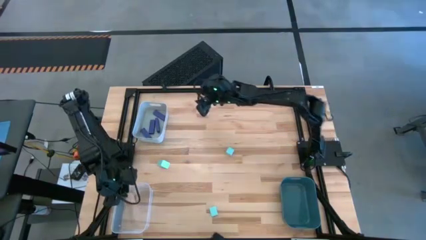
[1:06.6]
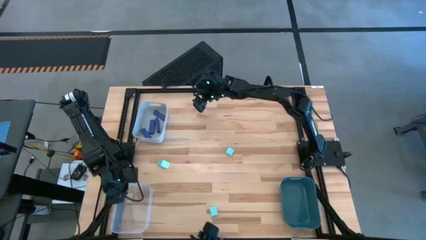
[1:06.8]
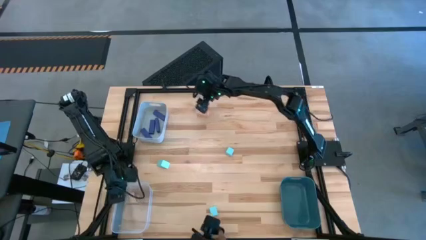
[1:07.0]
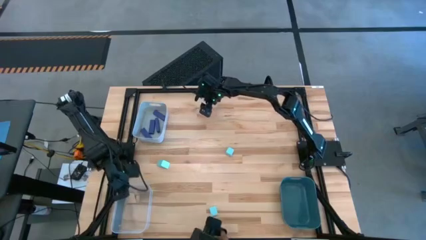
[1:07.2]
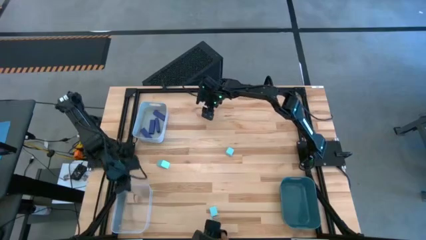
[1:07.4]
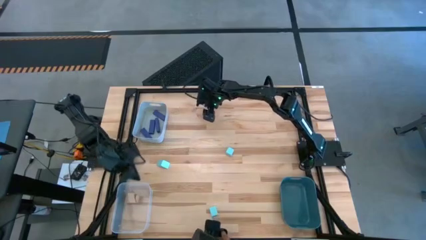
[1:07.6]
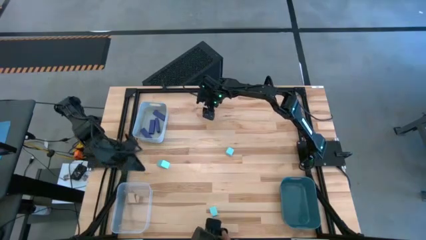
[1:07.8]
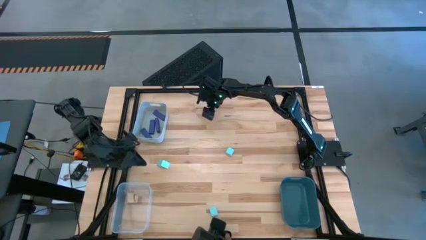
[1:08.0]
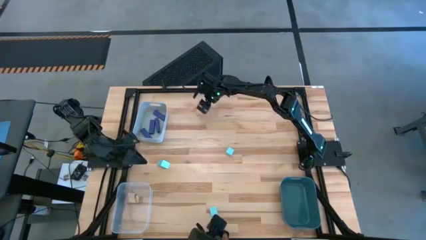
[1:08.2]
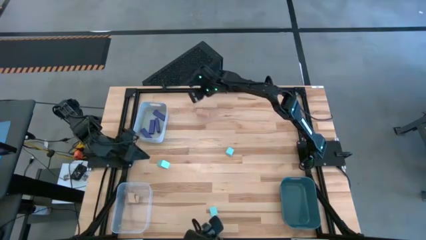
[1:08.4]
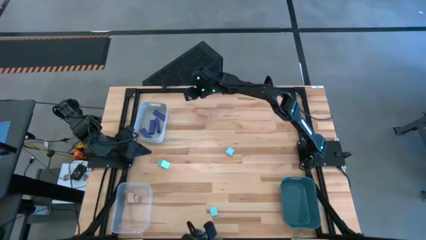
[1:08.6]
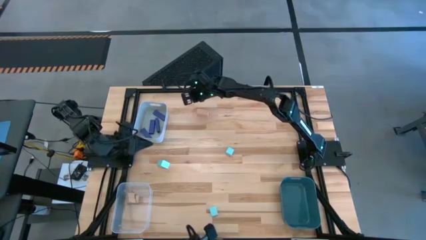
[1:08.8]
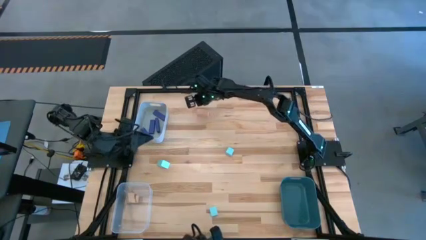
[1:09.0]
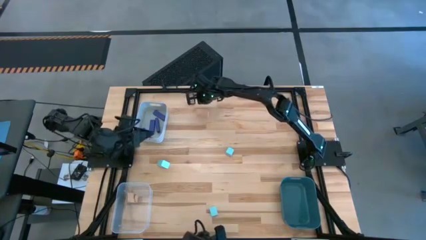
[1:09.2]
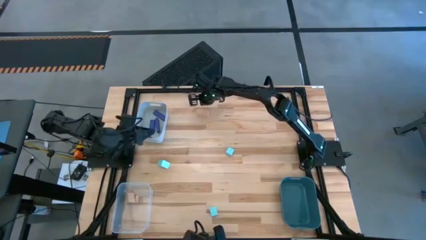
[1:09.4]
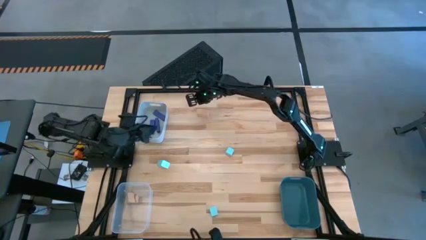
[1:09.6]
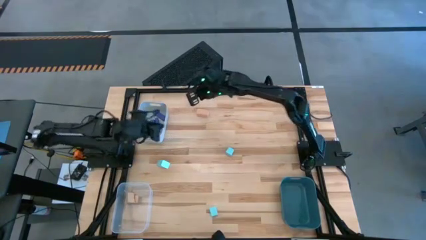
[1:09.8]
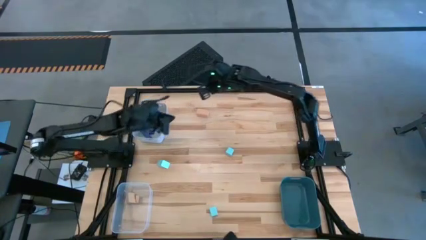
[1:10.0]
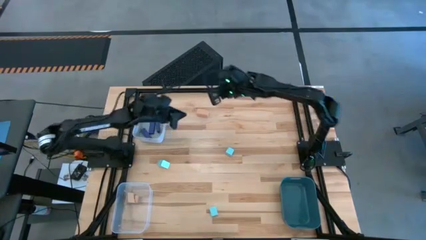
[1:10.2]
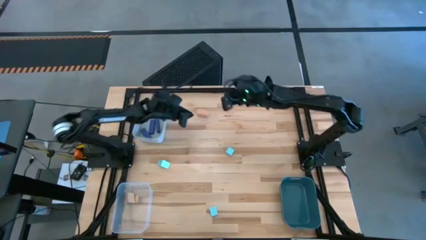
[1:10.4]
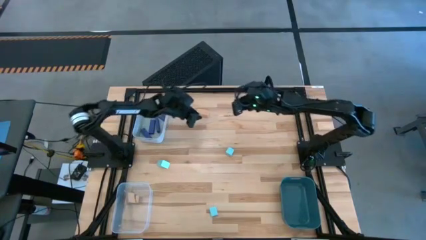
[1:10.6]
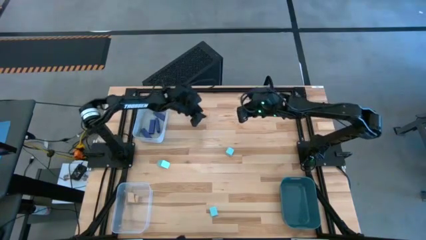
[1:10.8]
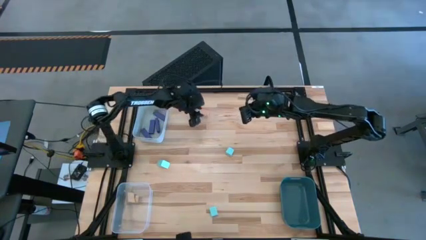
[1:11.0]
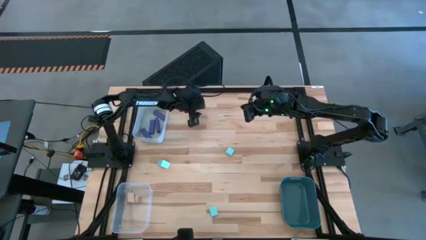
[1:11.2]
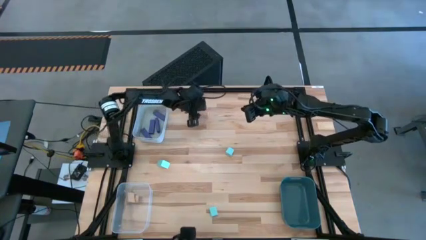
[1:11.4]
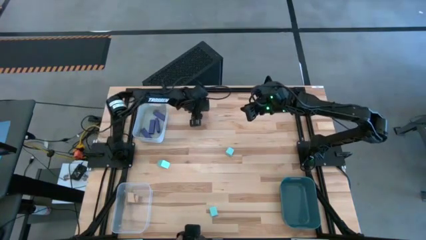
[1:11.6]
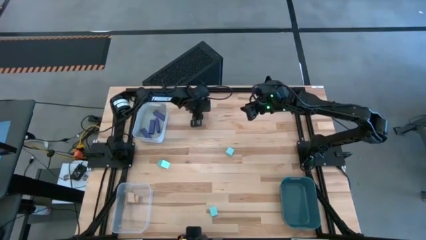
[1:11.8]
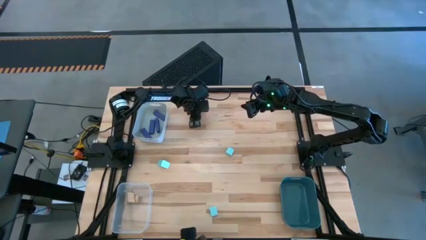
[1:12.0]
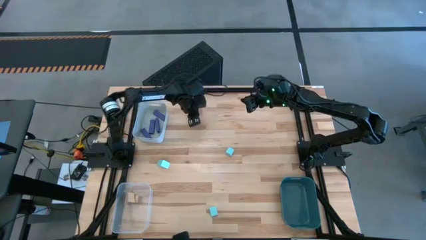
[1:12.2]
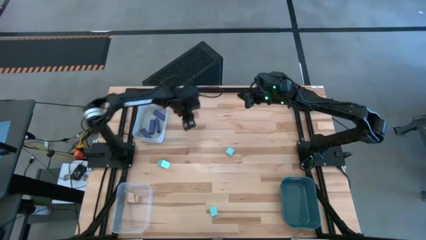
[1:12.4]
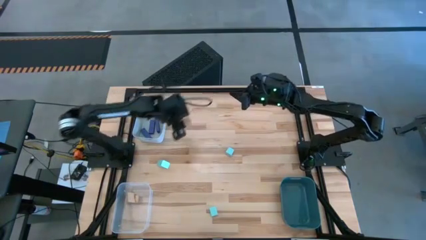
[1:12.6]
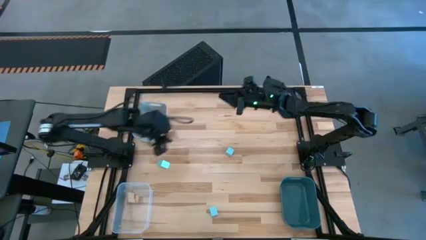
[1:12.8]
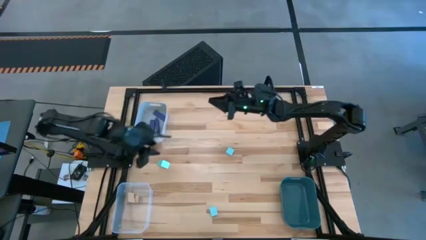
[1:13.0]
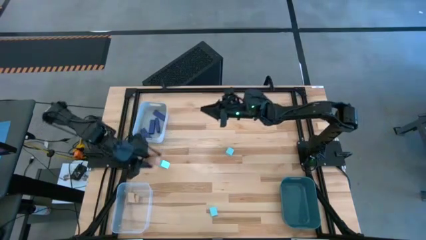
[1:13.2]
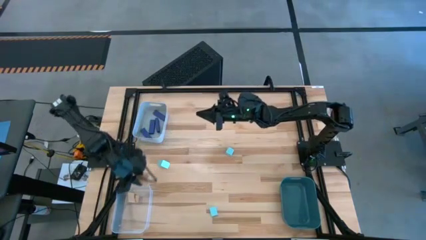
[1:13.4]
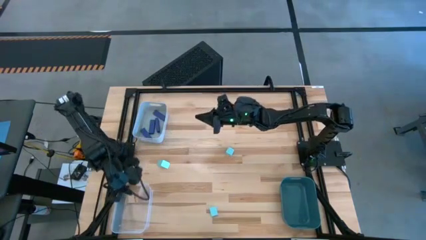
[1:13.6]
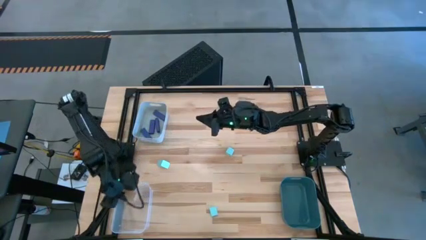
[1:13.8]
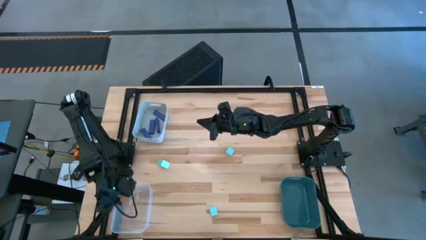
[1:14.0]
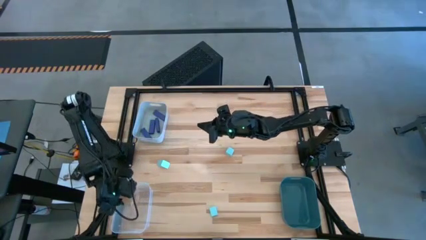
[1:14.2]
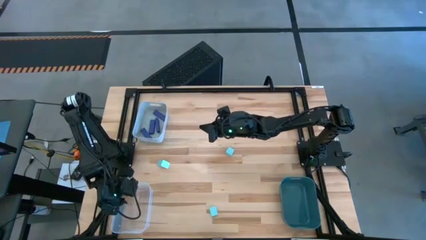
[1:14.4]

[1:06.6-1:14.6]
Task: Sort & place blocks by color
Put the brown block into the transparent bin

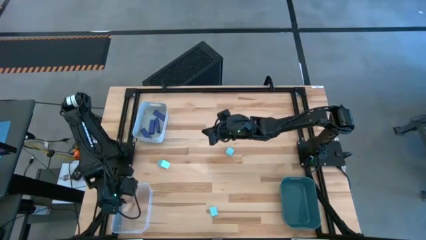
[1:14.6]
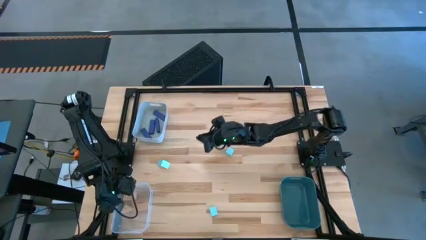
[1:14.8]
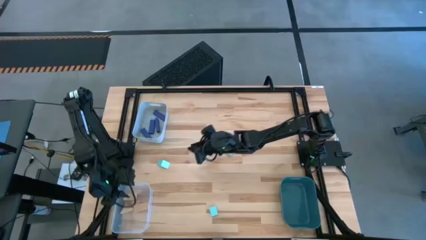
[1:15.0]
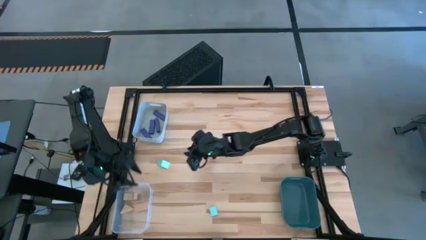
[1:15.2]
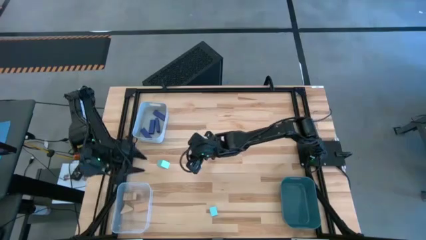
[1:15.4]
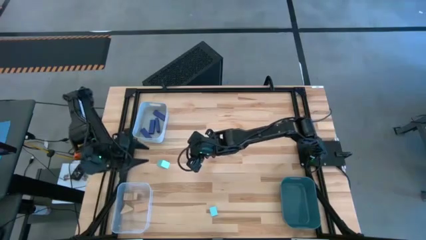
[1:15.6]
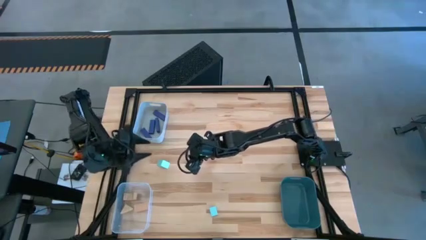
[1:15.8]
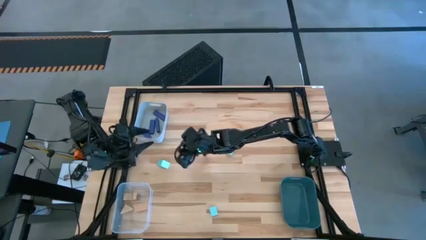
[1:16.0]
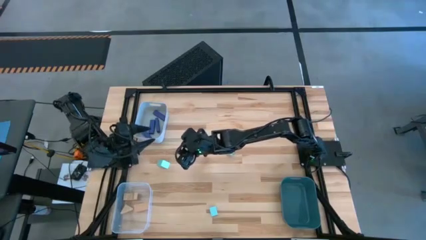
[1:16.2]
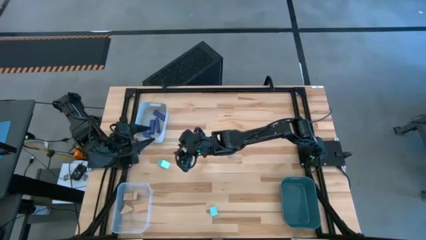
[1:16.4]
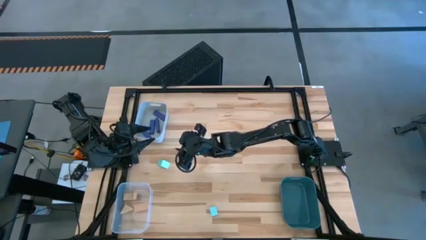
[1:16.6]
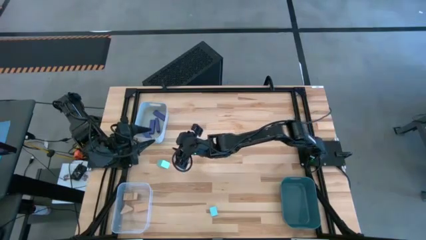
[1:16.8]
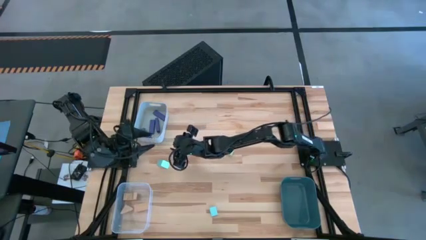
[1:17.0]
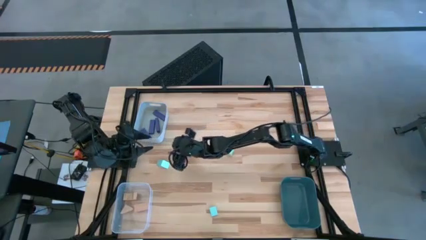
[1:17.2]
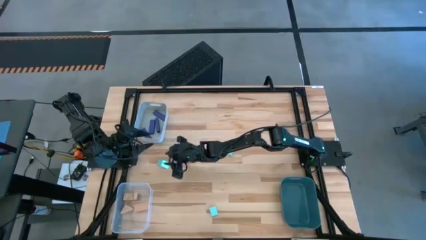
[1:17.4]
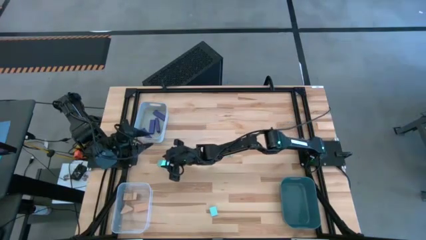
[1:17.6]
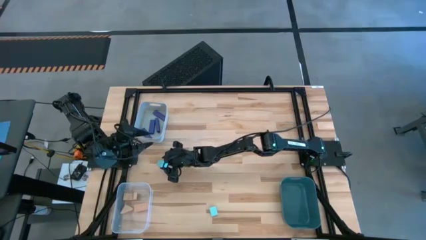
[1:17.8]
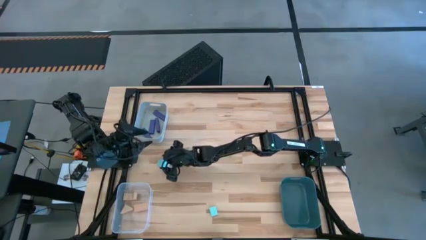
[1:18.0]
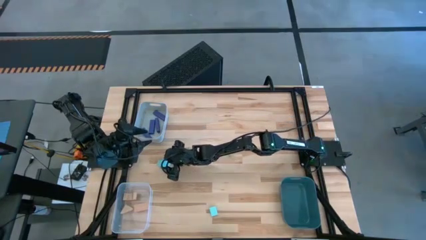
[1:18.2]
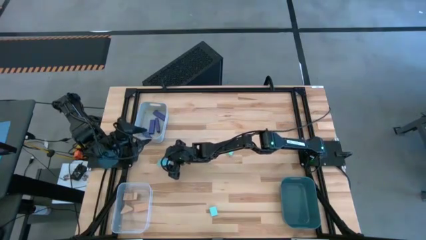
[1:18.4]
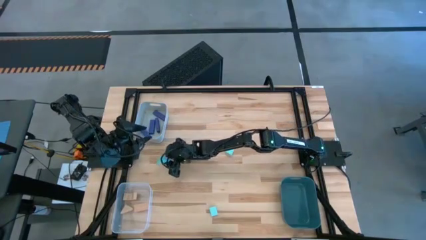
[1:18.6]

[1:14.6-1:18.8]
Put the blue block into the blue bin

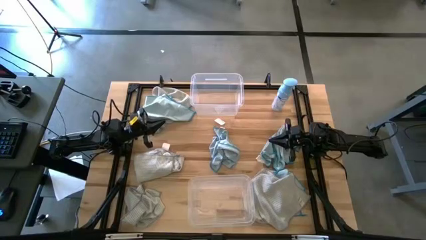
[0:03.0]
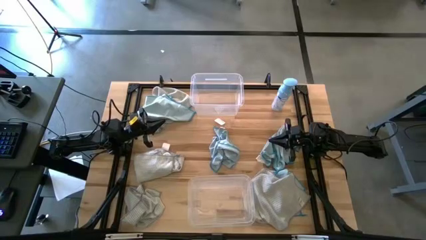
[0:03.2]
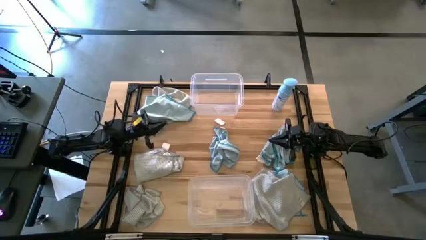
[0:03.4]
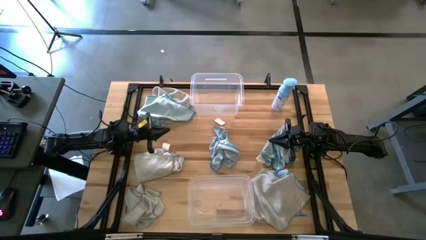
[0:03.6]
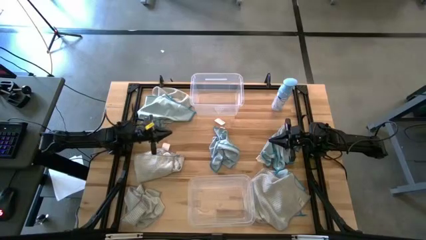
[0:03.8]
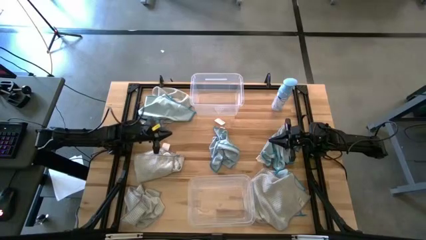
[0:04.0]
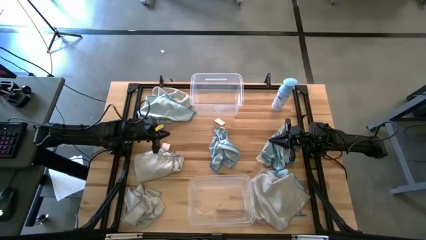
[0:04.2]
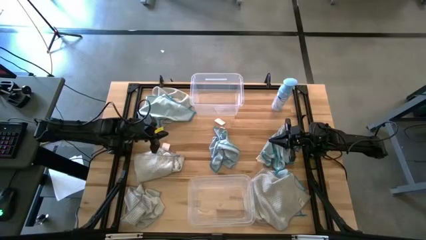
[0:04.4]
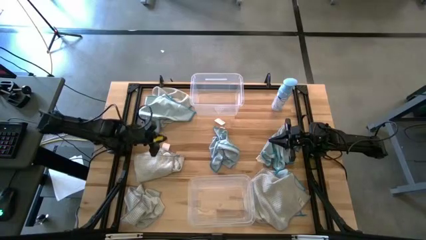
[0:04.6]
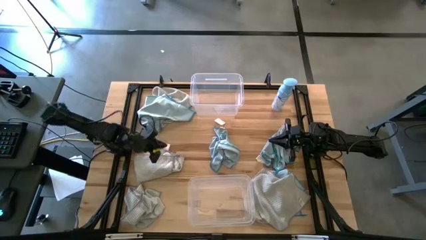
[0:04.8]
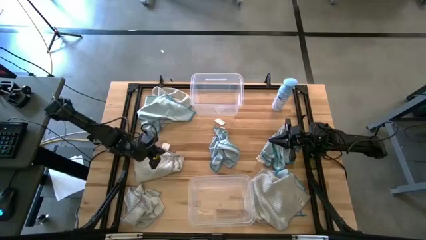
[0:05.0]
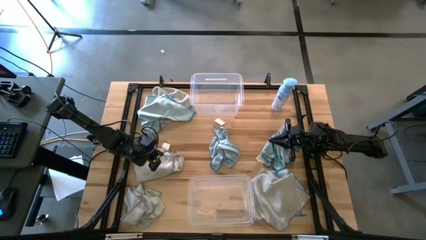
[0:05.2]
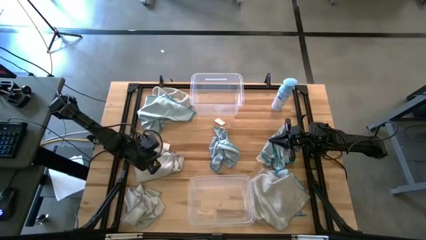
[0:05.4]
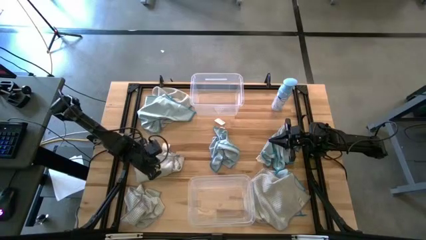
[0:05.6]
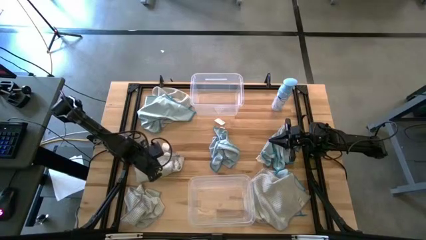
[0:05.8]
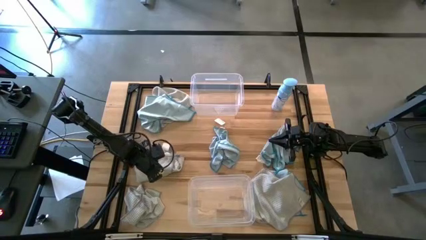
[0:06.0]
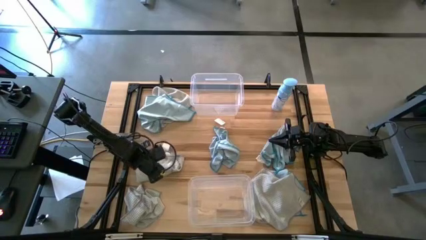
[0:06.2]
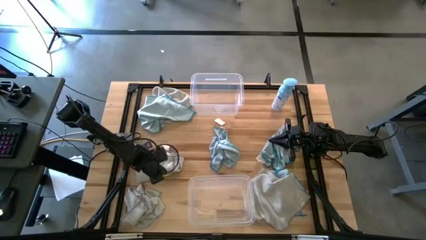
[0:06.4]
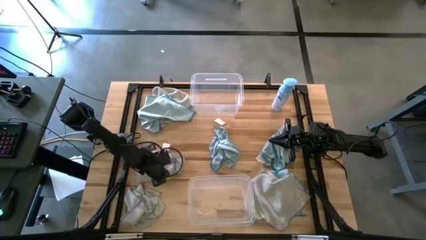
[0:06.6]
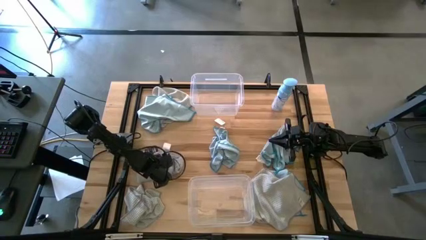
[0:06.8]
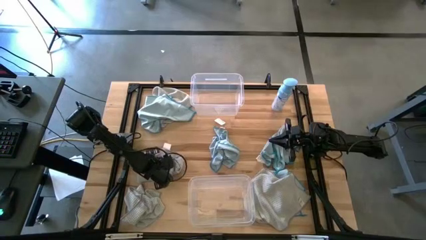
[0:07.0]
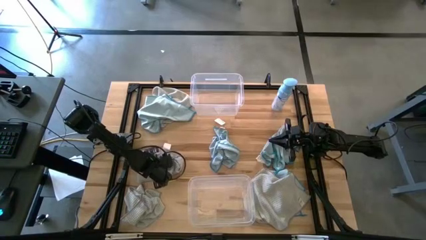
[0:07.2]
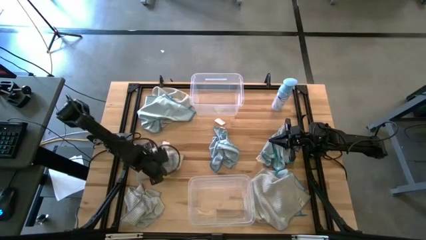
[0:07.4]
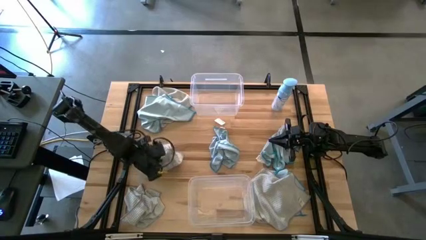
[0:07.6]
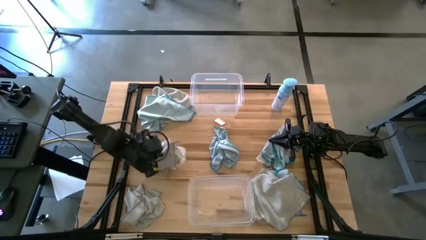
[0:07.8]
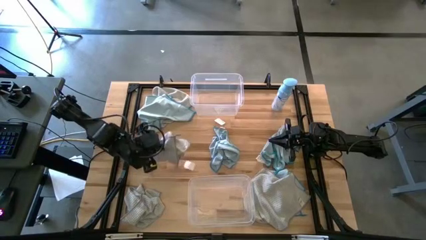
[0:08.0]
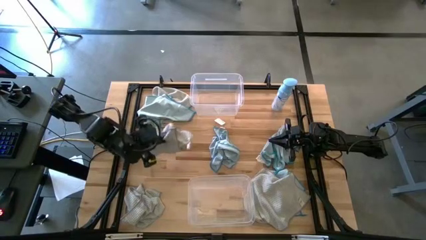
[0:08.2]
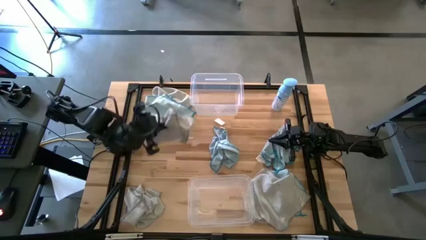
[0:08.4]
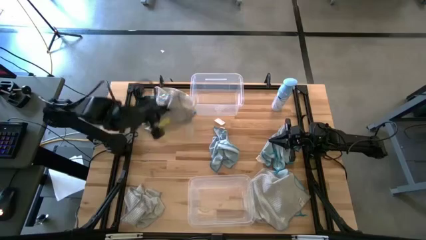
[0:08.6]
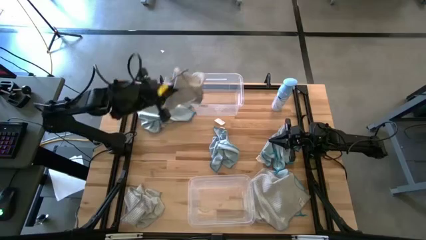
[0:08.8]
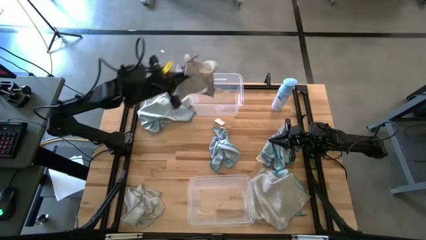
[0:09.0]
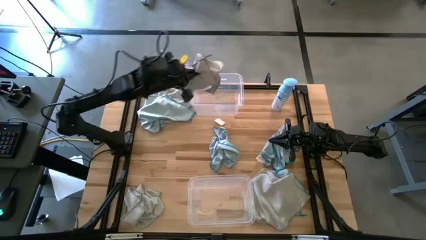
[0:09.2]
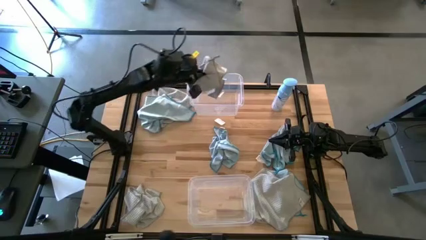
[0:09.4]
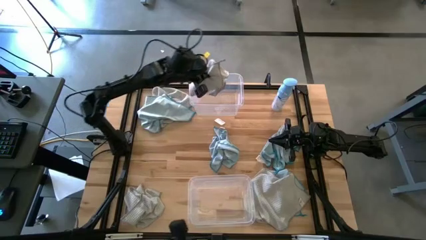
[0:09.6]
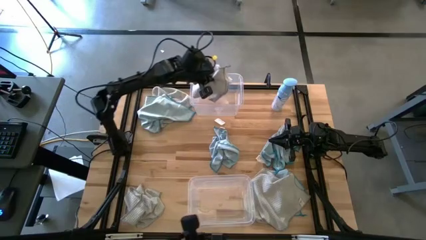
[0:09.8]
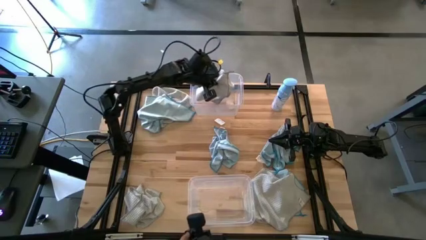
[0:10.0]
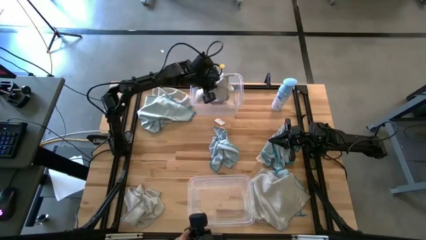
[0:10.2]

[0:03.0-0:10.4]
Task: Sort microfiber towel by color & place in baskets
Put the middle left white towel into the top transparent bin
